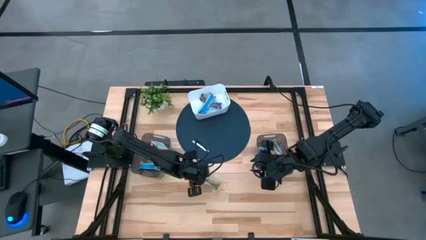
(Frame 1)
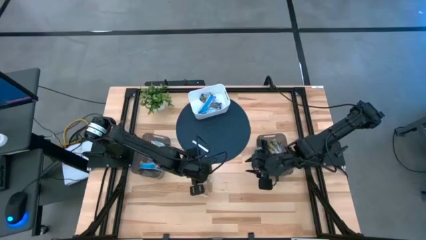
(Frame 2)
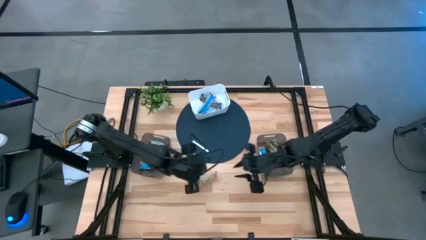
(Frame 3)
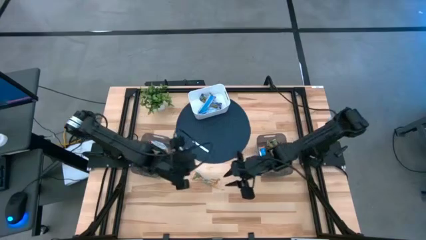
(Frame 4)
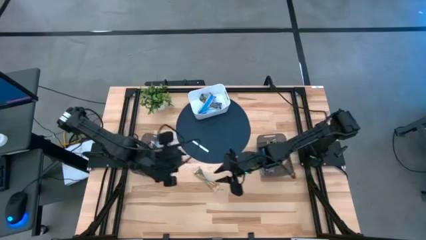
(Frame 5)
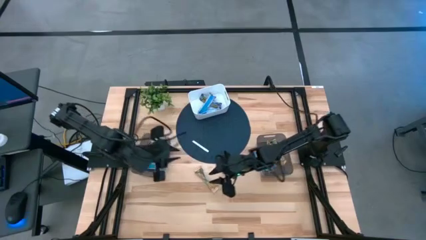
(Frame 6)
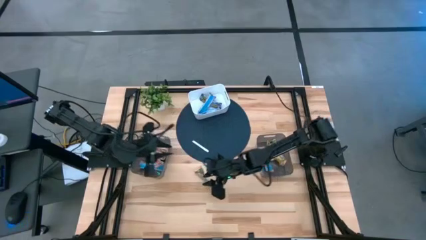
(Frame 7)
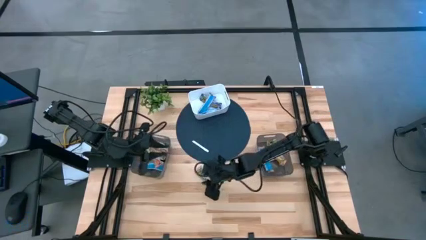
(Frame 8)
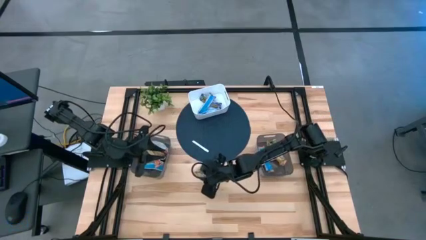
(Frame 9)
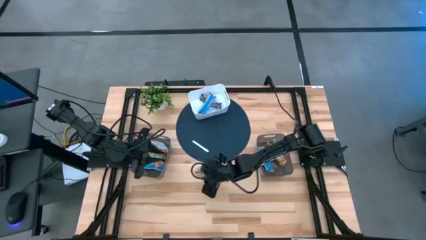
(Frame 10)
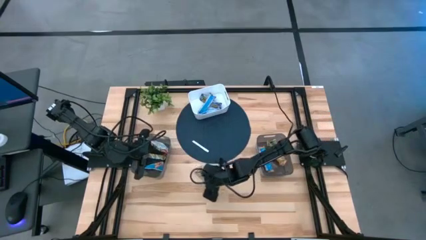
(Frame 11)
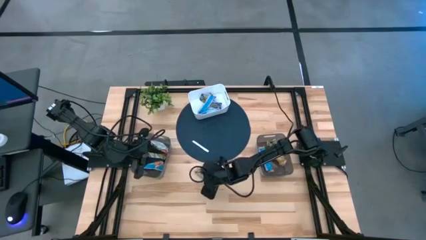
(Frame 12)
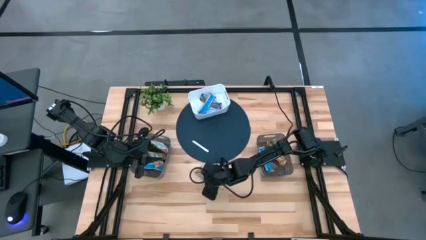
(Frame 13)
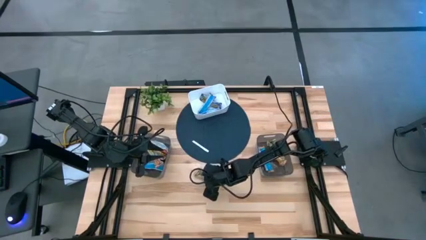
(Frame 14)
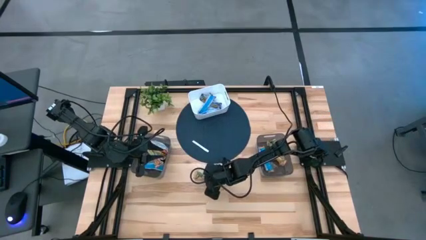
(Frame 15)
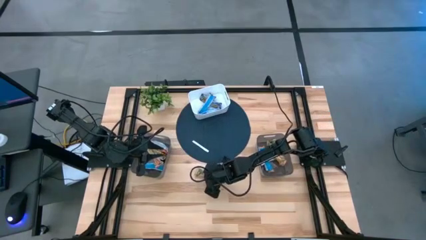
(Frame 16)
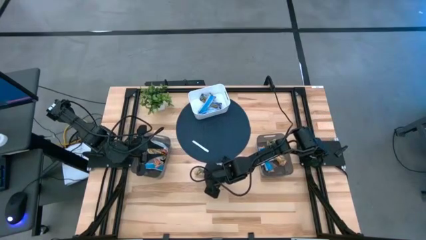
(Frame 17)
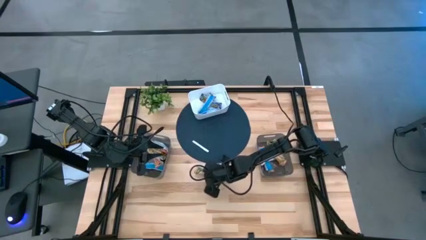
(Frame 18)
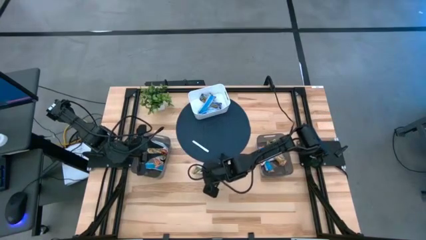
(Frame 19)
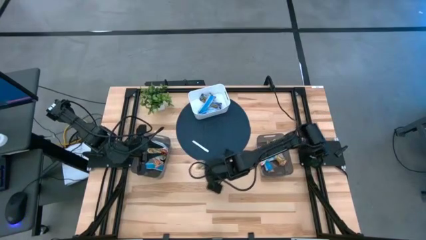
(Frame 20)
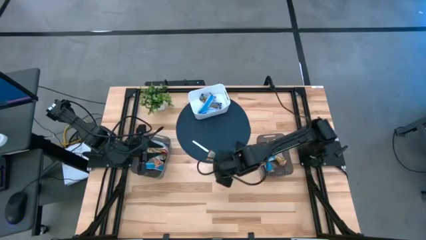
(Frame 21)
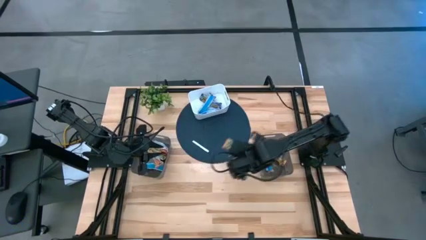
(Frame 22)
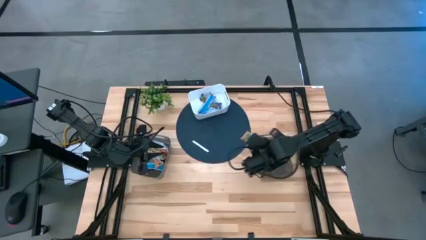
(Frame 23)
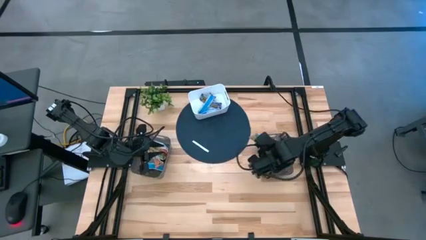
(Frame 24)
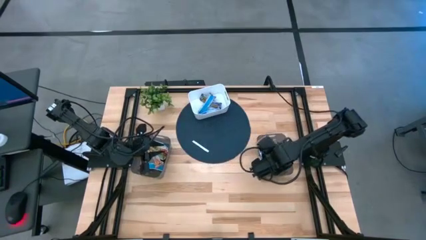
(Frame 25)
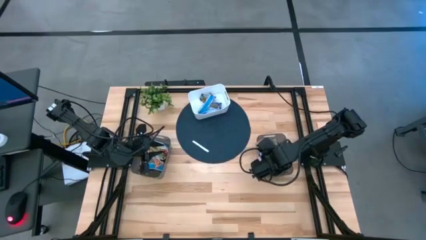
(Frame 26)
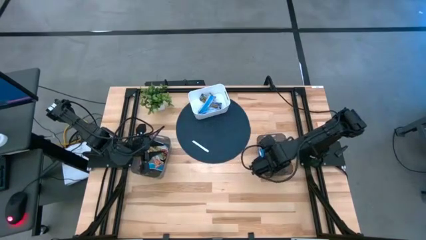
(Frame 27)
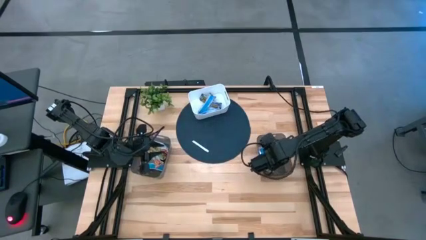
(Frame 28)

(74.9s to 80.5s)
Task: Pick and place Granola Bars by type
Put the yellow granola bar into the right black bin

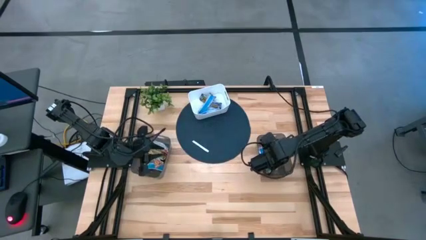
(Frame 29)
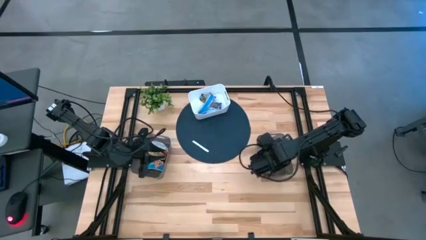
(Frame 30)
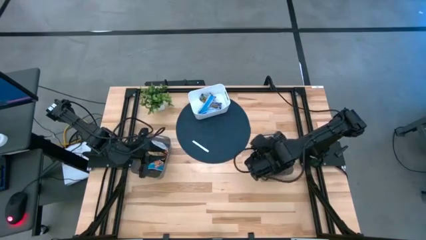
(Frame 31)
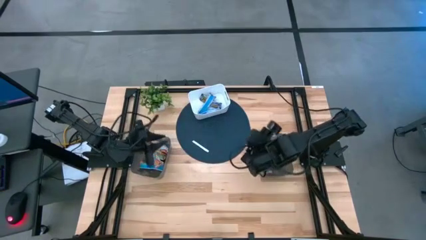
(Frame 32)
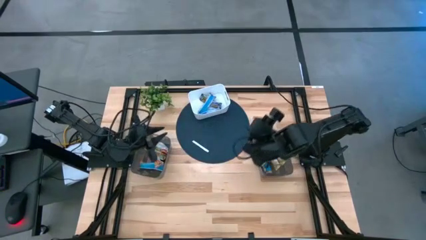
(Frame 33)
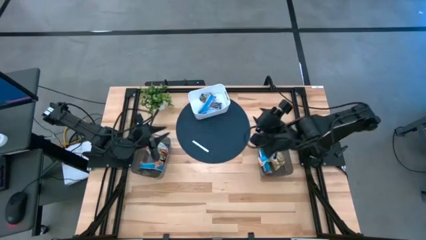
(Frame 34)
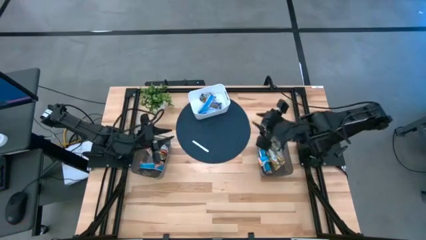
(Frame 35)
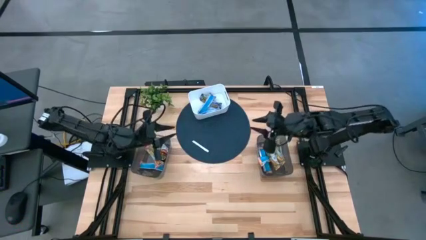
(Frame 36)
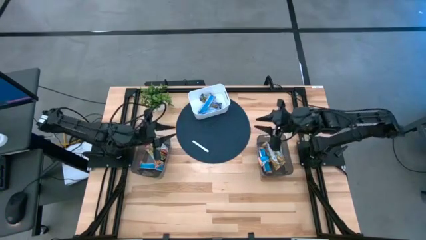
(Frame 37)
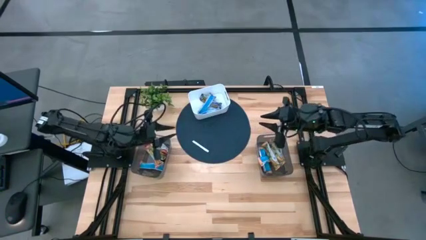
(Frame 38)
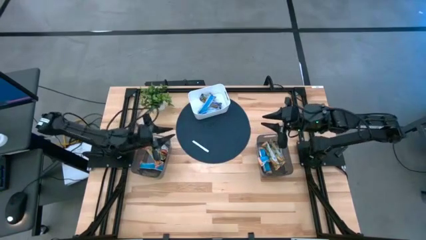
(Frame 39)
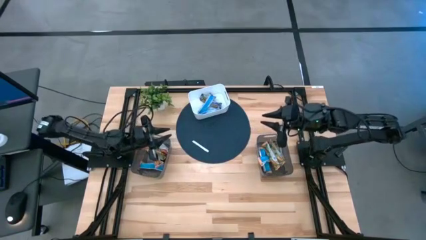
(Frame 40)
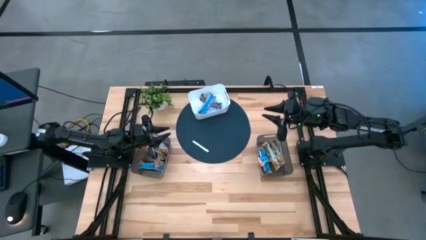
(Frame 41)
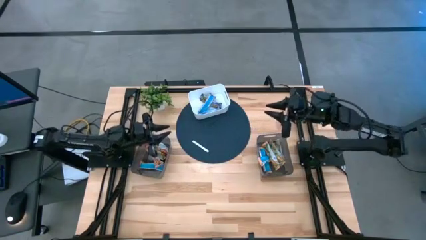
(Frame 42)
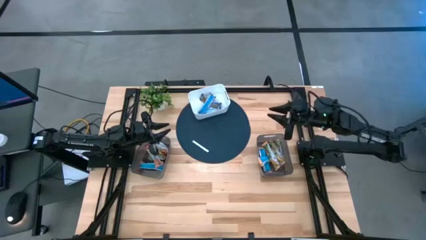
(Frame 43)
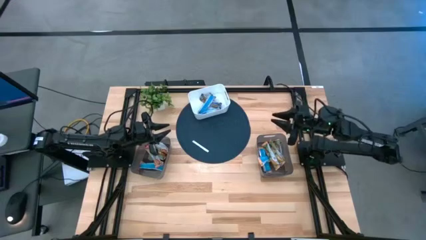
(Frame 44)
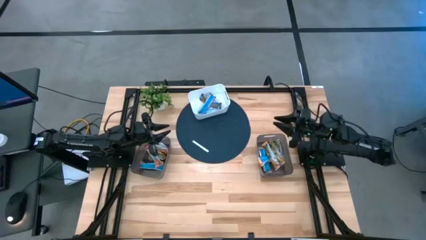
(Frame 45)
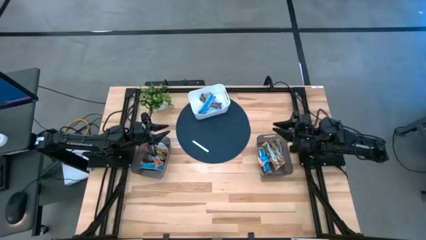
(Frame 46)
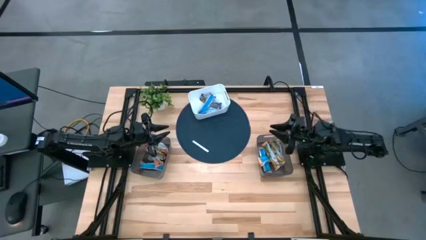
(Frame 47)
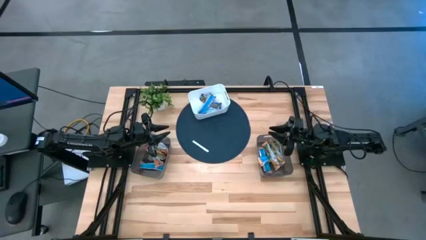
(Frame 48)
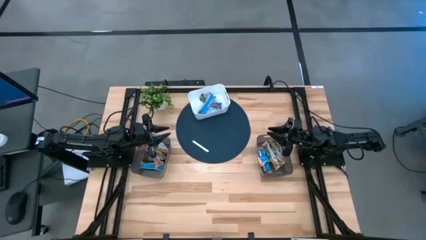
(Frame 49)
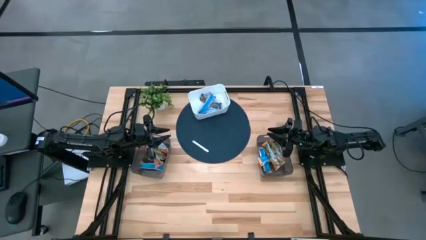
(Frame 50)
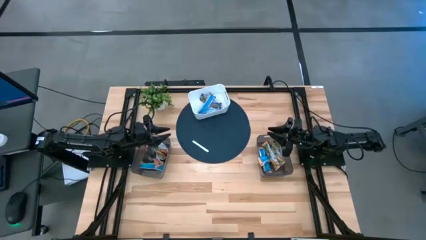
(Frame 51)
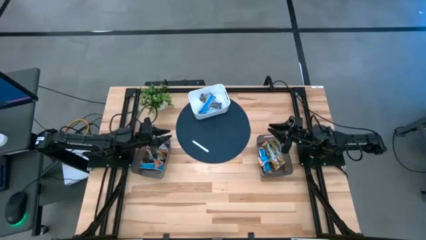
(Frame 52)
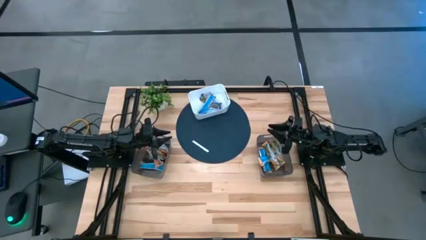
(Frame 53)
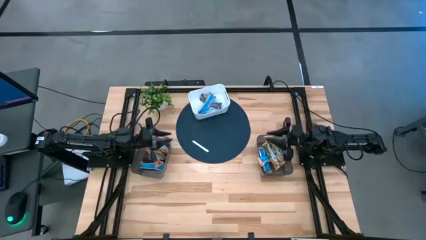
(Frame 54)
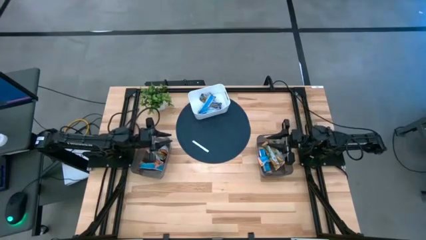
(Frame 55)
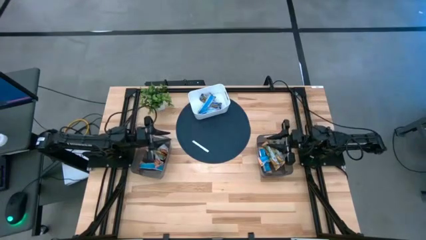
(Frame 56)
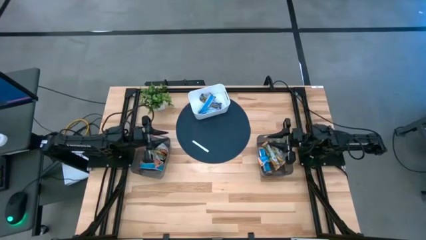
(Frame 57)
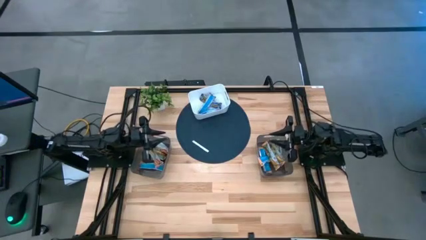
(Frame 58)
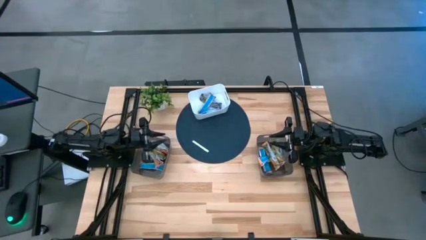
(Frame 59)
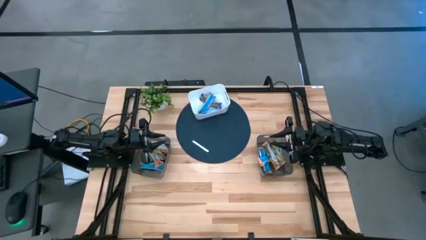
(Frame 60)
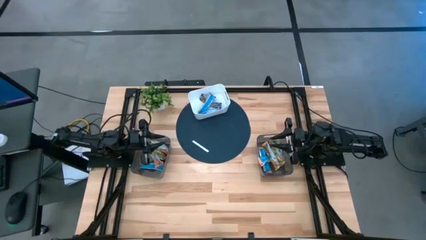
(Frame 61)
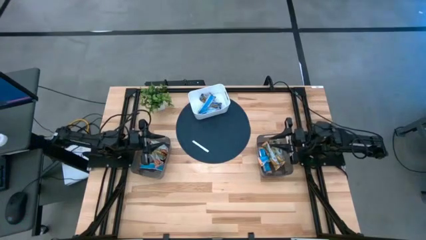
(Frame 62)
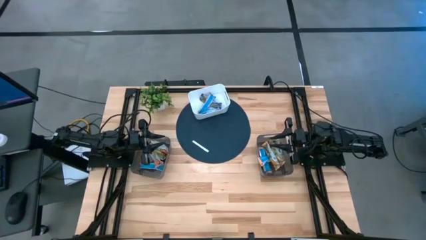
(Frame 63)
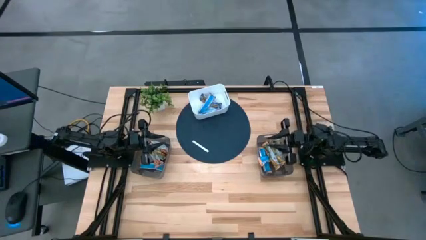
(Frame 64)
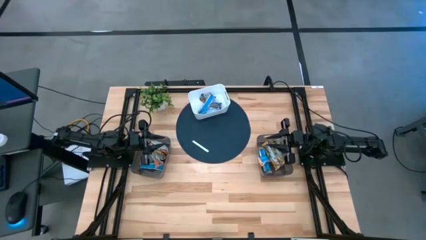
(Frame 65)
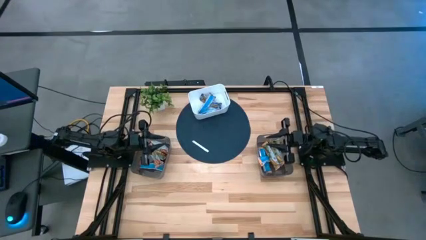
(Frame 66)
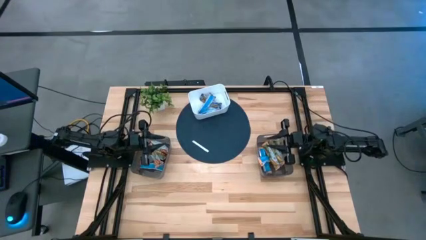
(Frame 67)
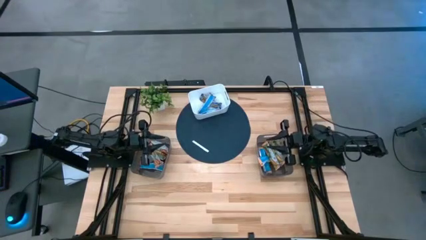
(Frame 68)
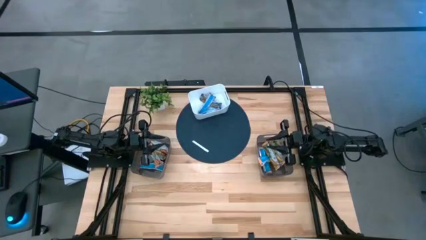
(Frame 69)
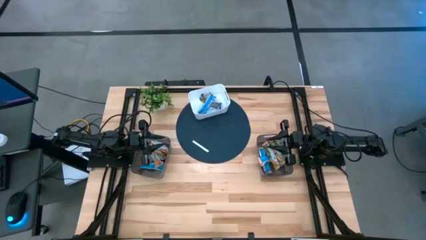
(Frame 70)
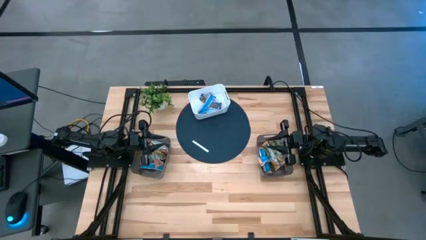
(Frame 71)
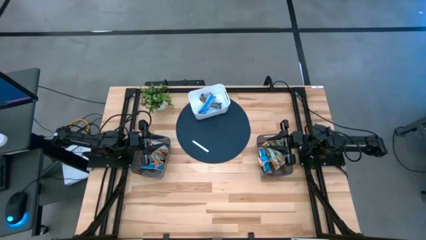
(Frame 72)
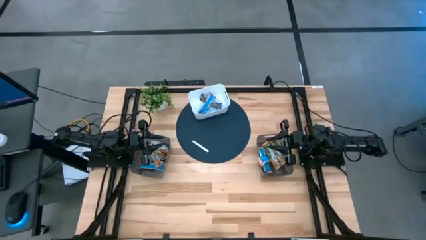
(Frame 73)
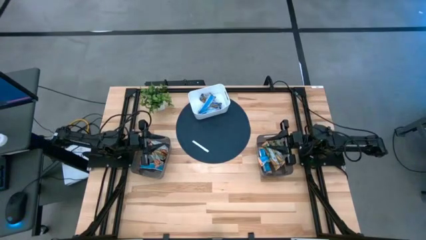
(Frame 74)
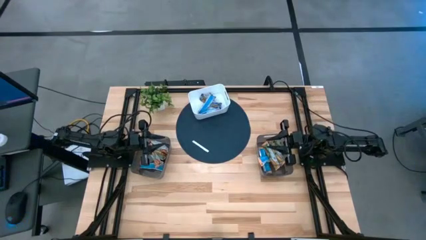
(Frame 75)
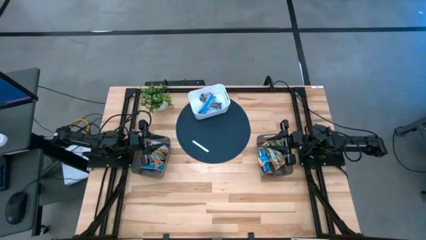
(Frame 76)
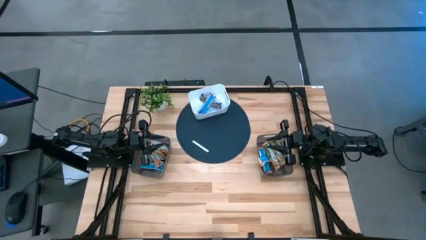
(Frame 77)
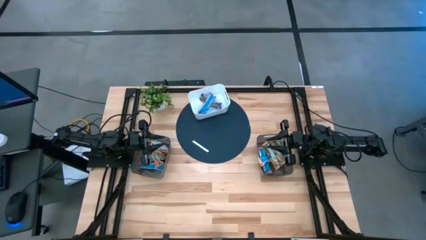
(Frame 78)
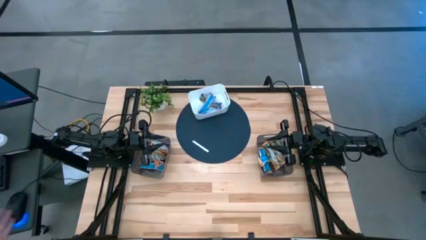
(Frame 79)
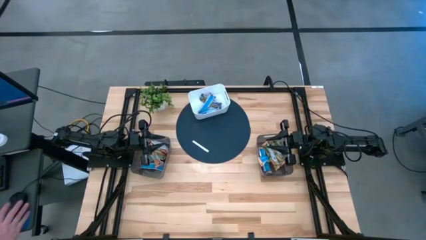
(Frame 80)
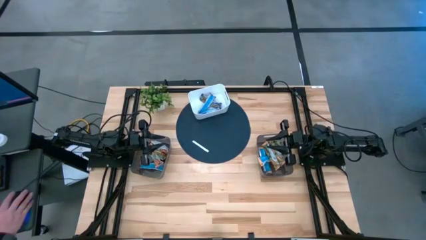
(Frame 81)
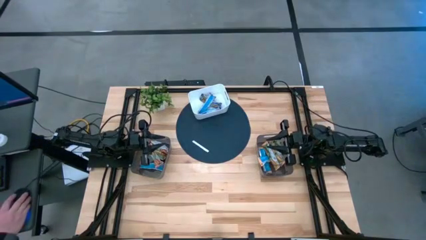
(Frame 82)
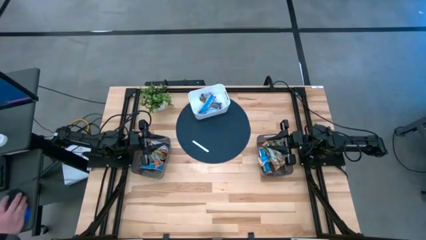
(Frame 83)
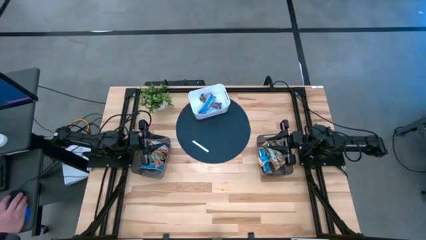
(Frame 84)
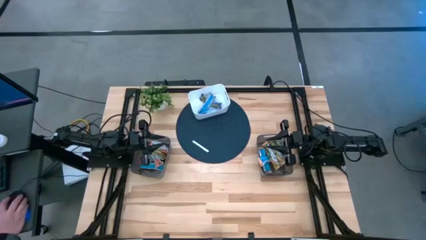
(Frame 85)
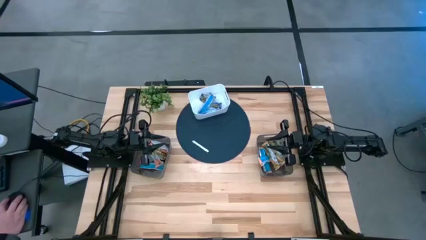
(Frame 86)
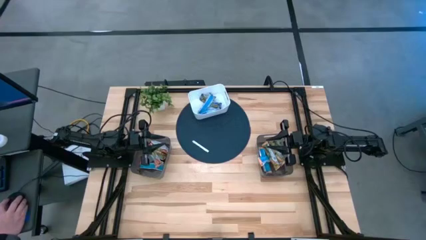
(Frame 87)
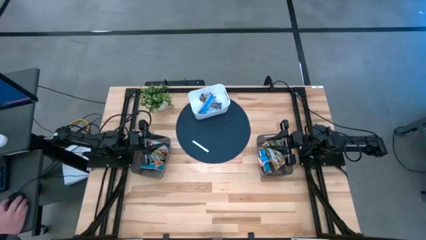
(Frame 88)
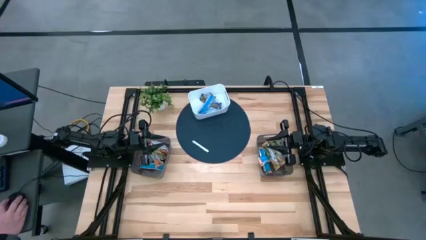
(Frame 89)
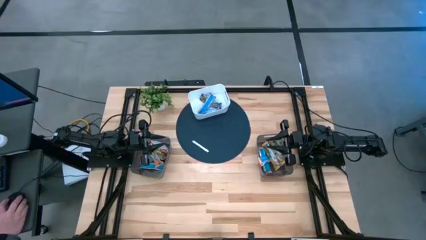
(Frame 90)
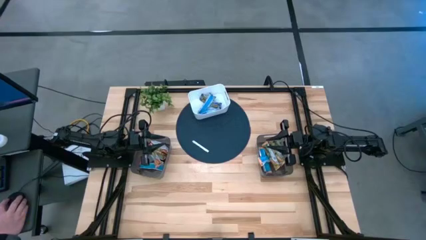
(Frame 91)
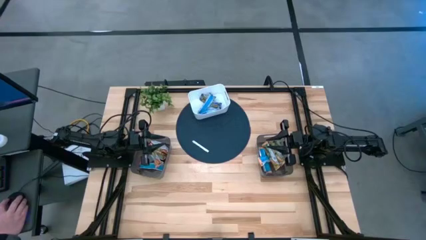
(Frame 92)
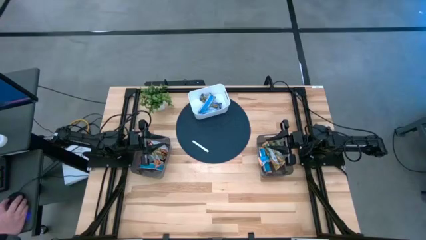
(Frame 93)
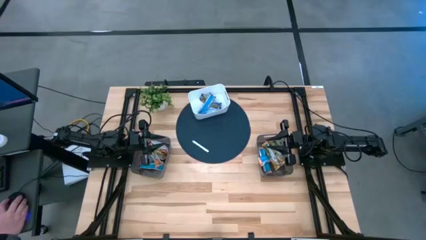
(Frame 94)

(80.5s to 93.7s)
Return to Home Position
